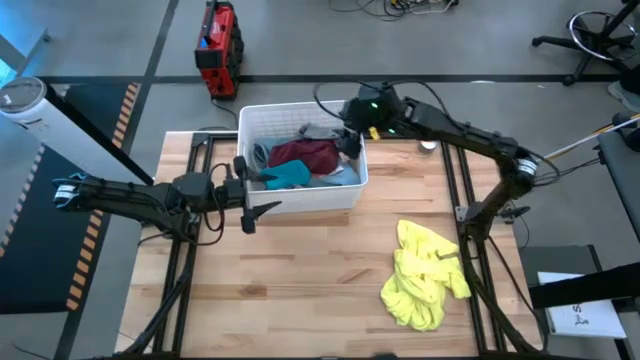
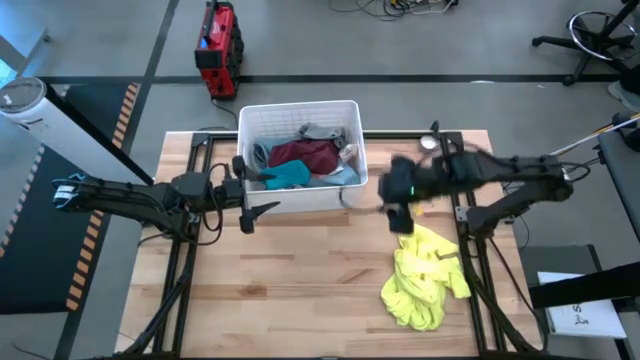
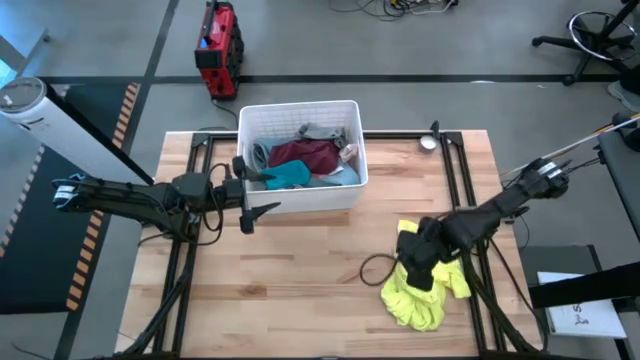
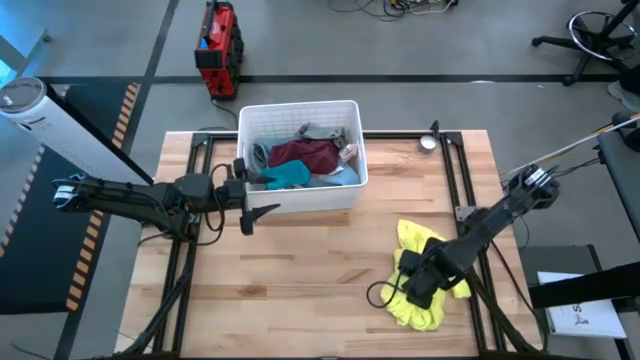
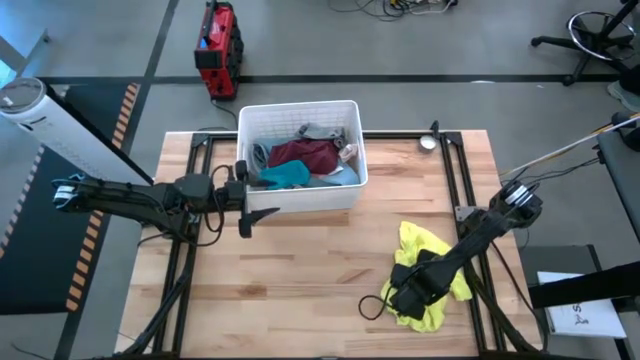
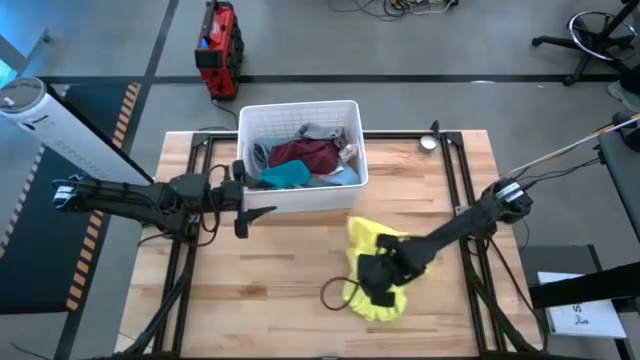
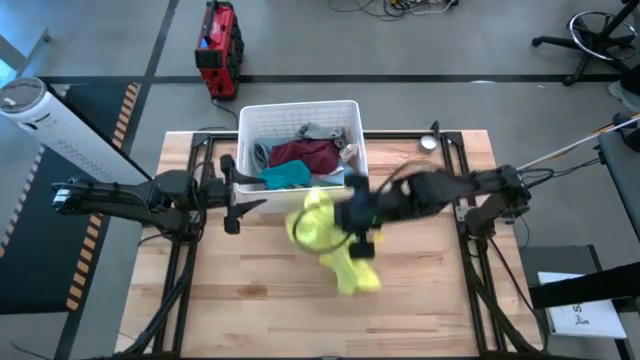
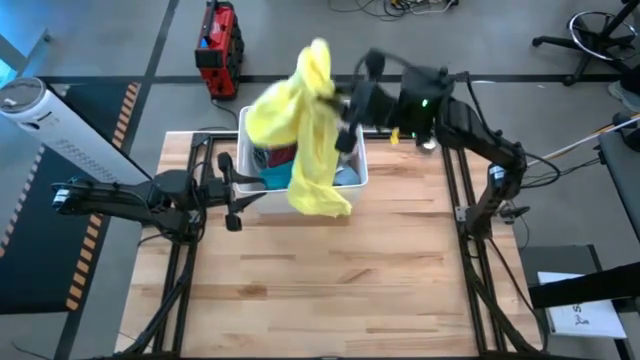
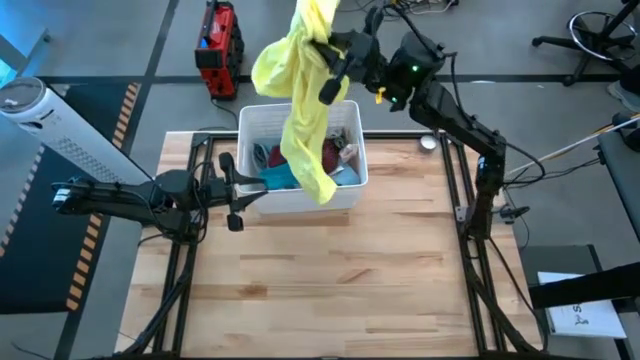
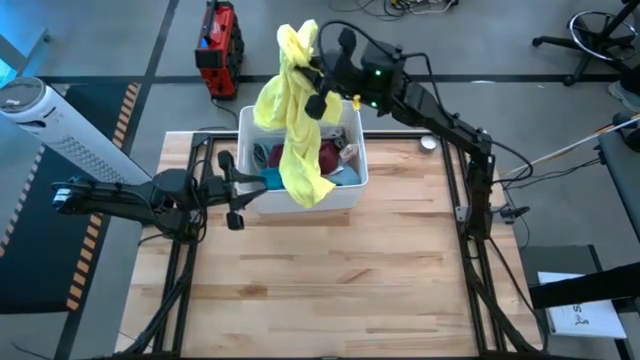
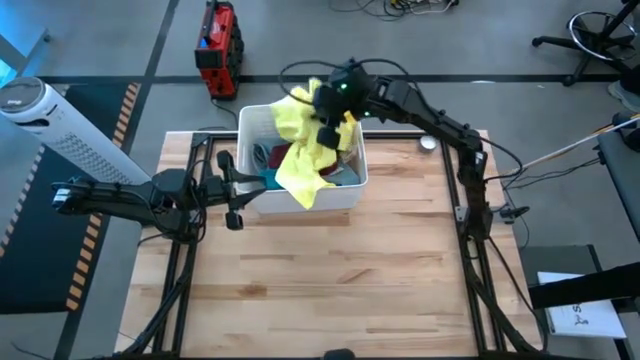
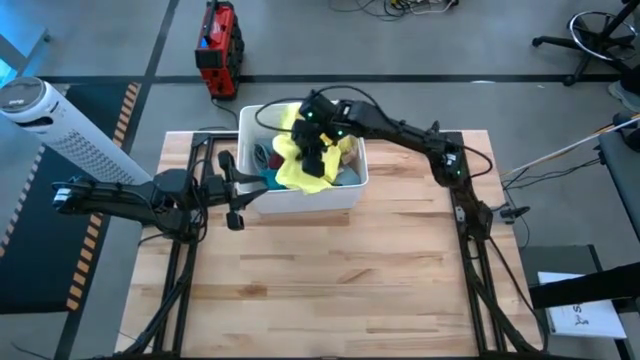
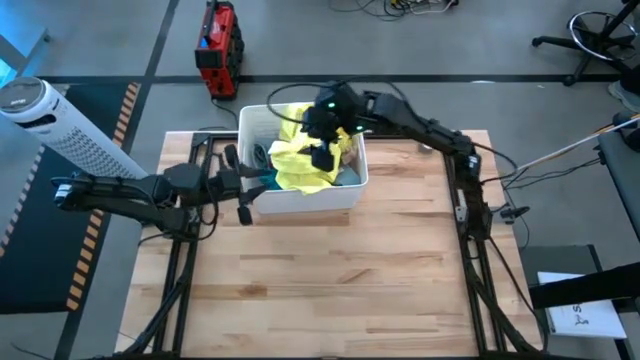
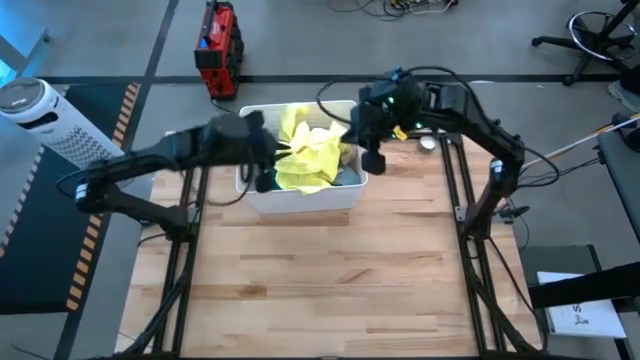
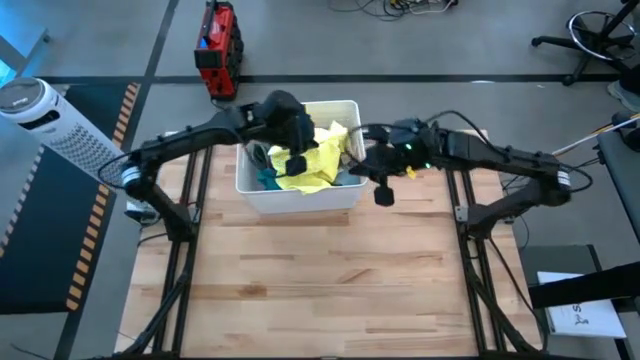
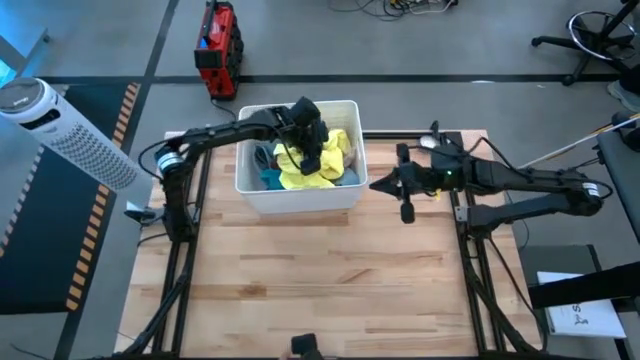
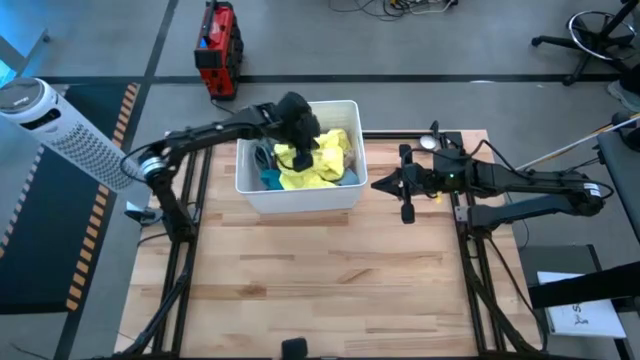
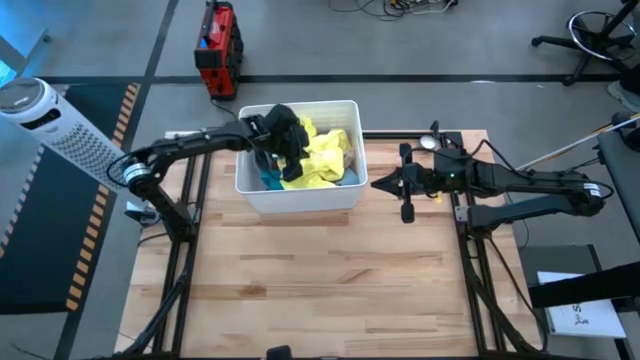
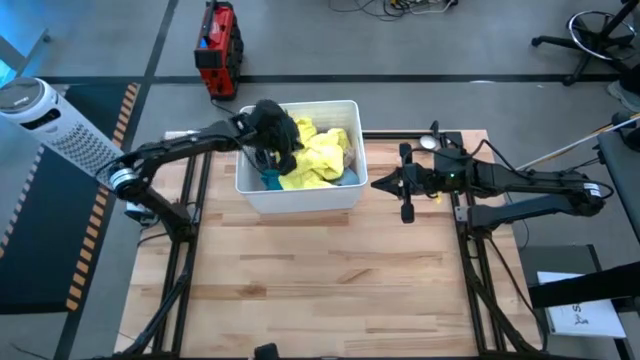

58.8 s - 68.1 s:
Task: Sort clothes
Put the yellow shirt into the white laundry bin

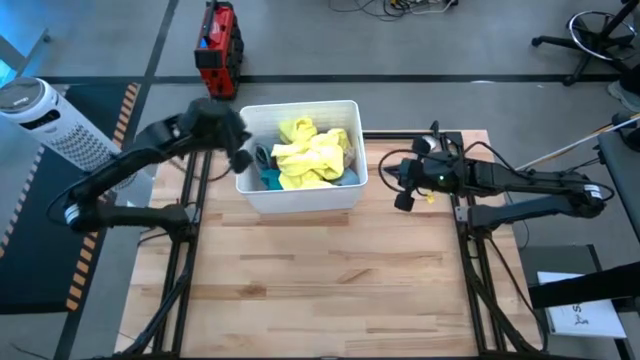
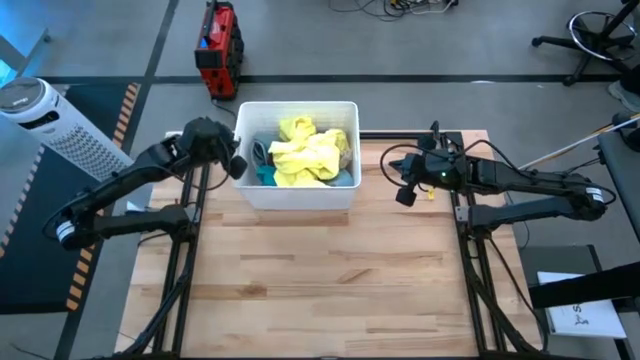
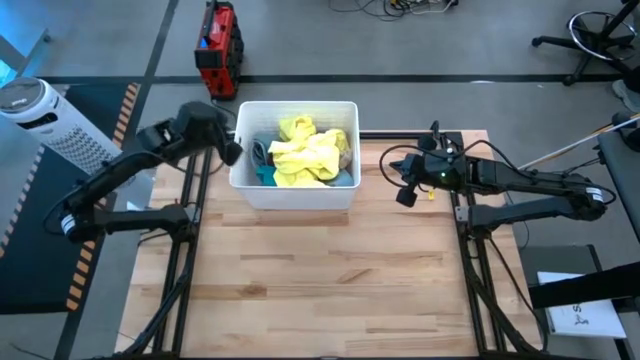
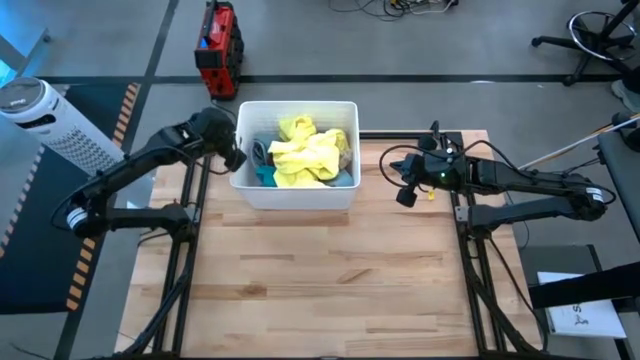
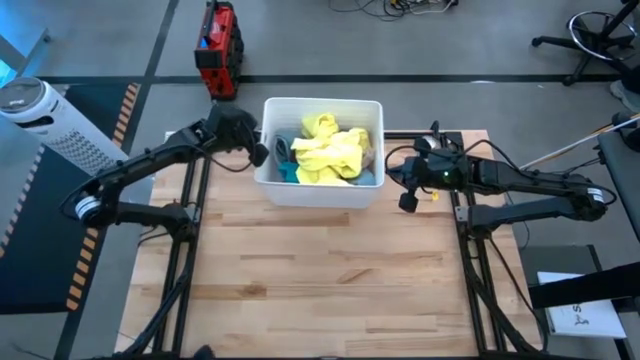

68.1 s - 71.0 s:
Move the white laundry bin from the top left to the top center of the table

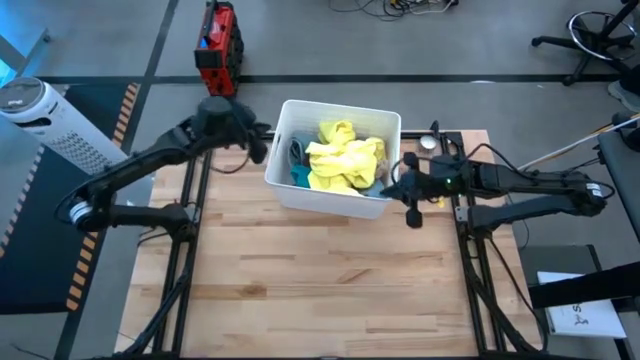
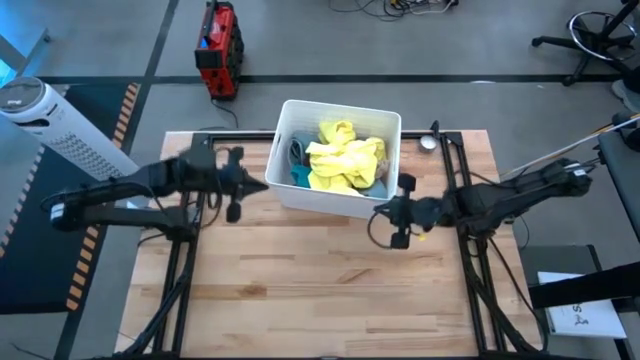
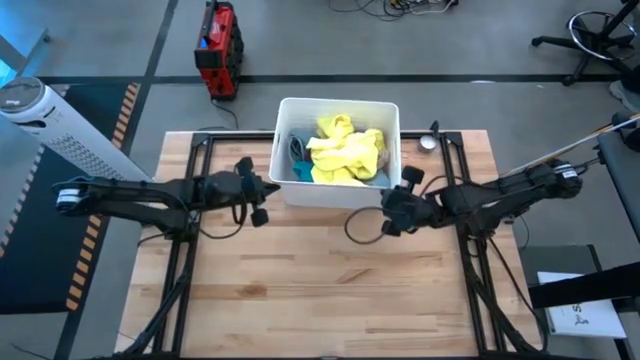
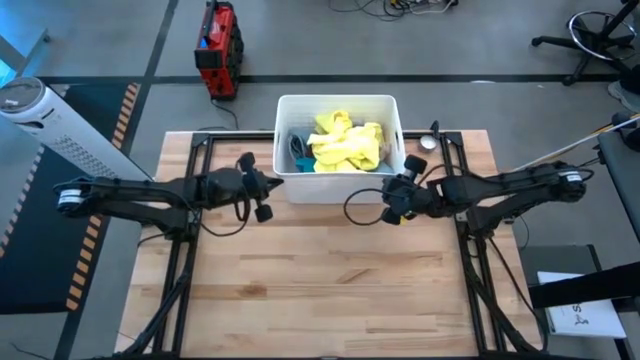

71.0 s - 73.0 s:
Adjust the white laundry bin

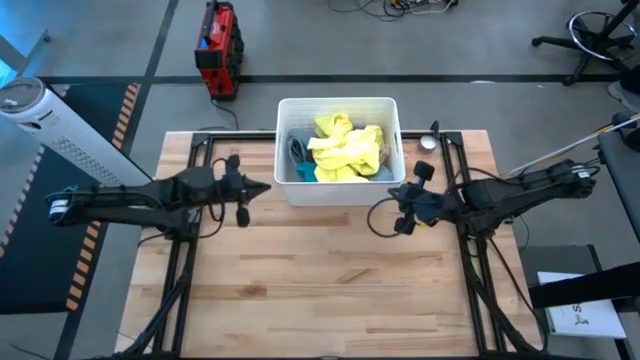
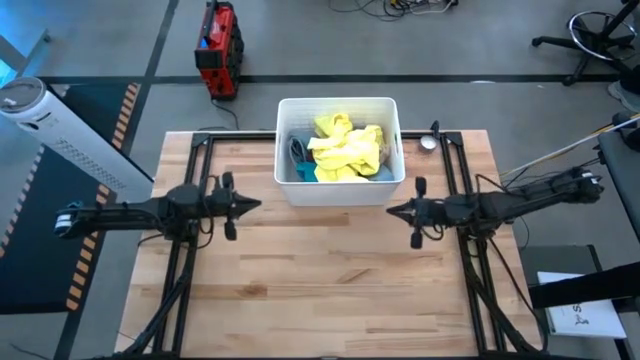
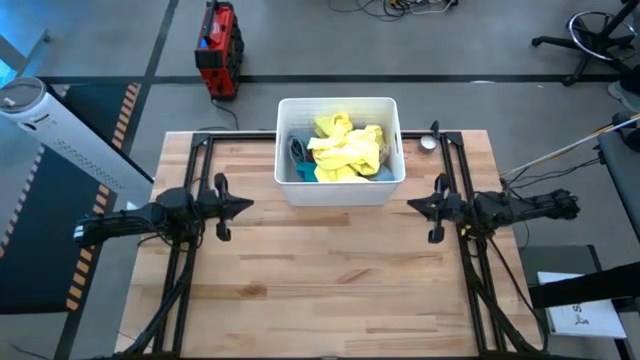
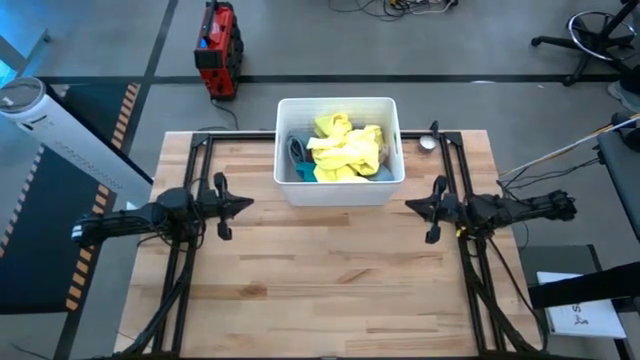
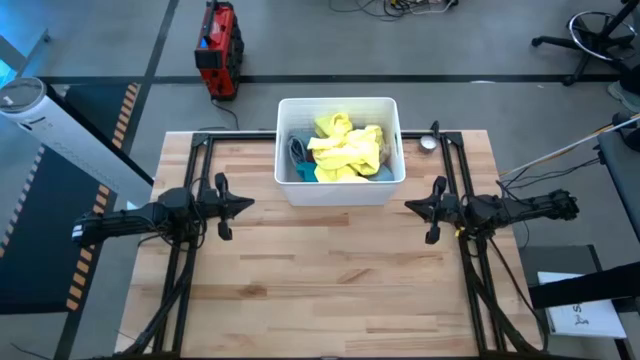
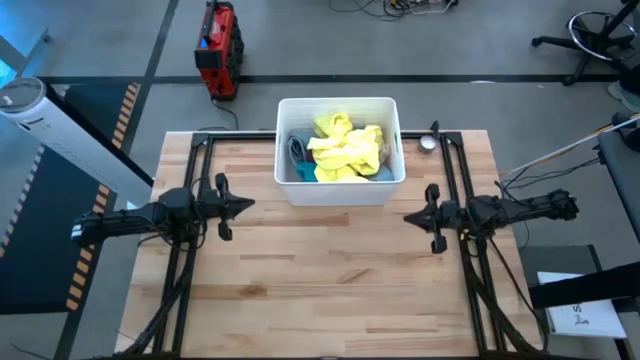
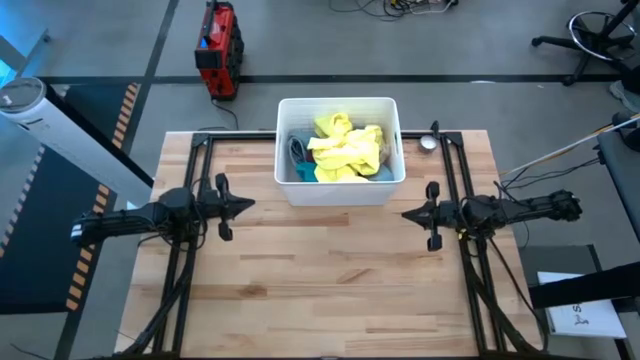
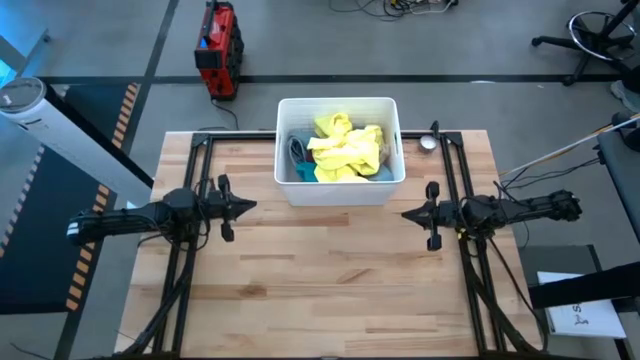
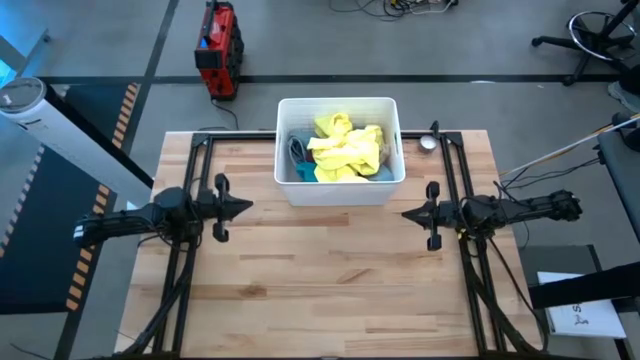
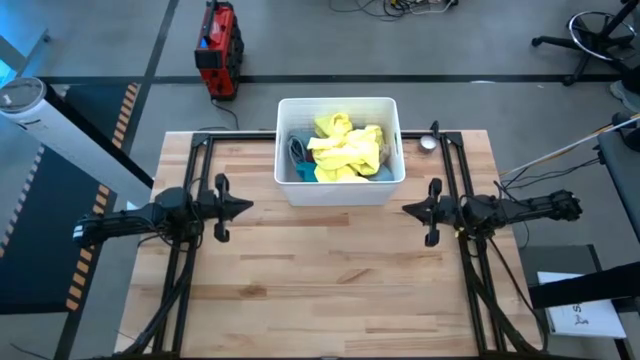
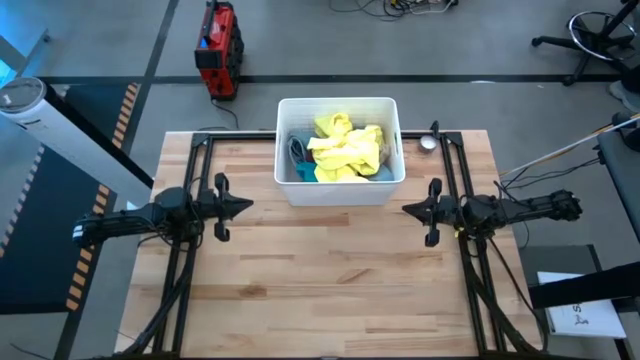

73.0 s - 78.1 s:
Return to Home Position

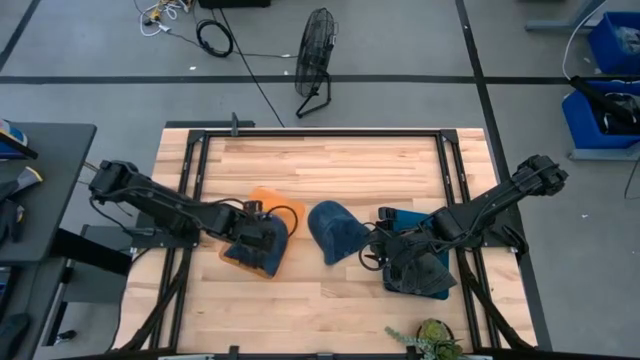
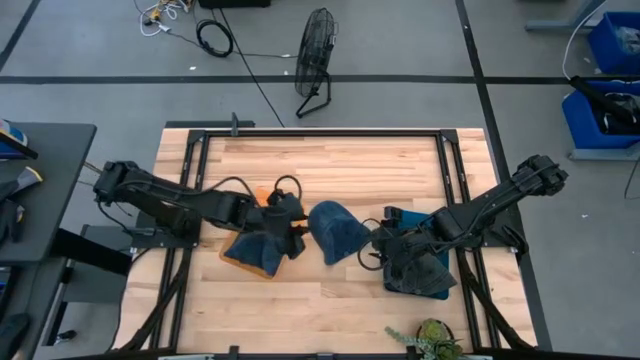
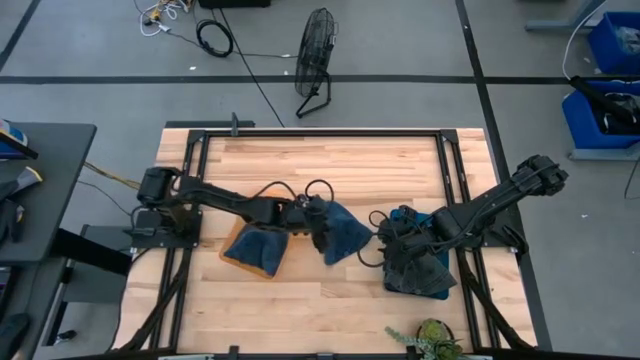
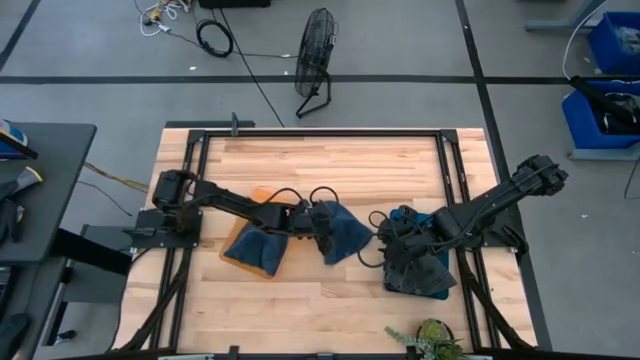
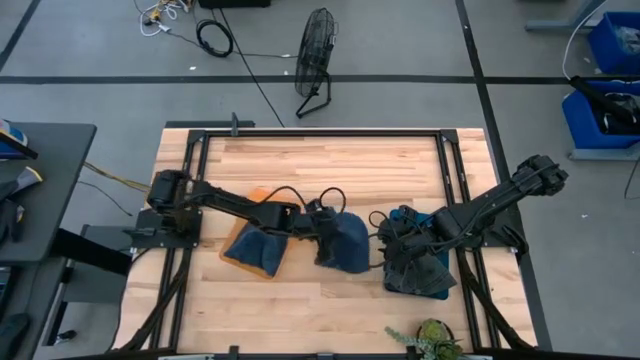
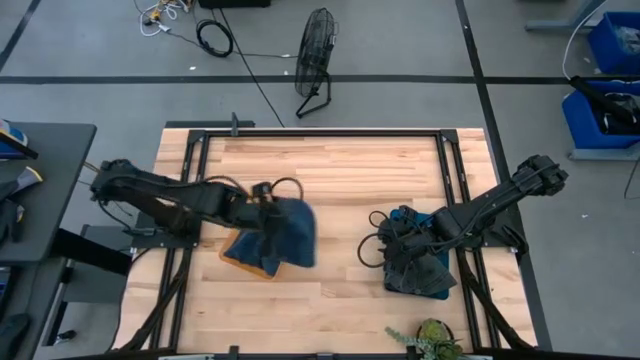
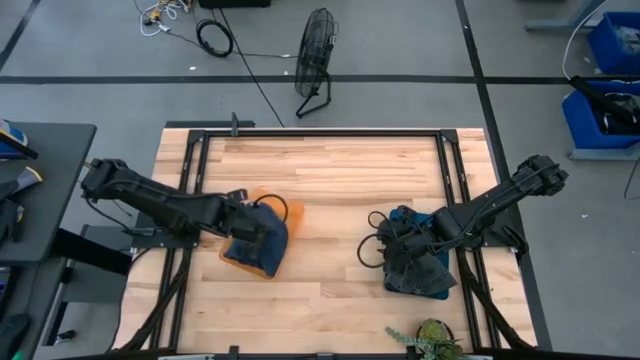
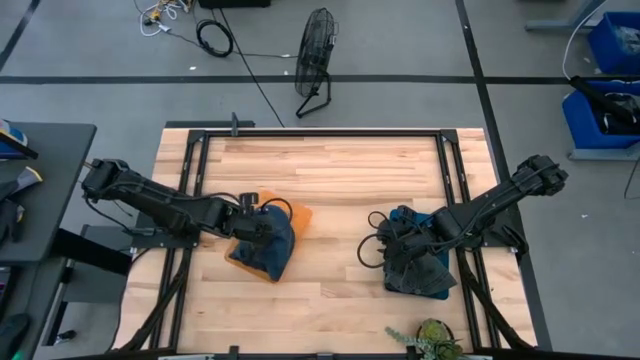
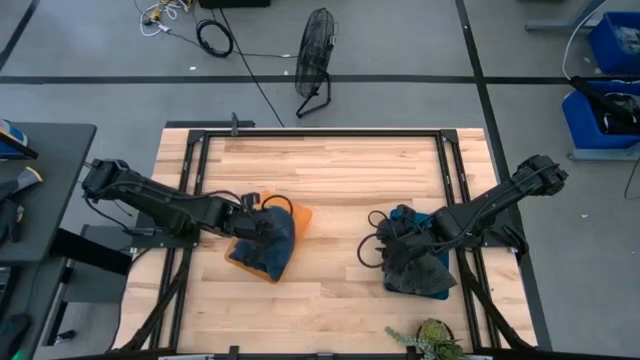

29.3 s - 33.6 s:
Task: Pick & Place hat
Put the blue cap into the yellow bin
